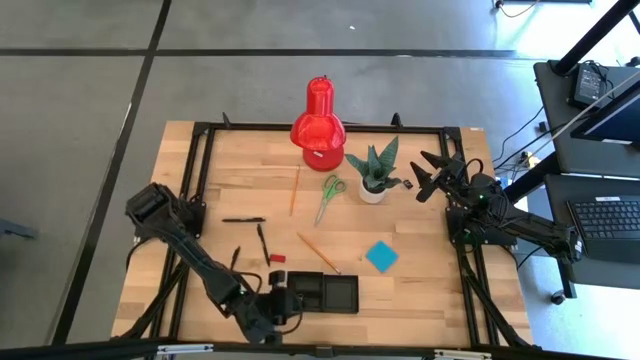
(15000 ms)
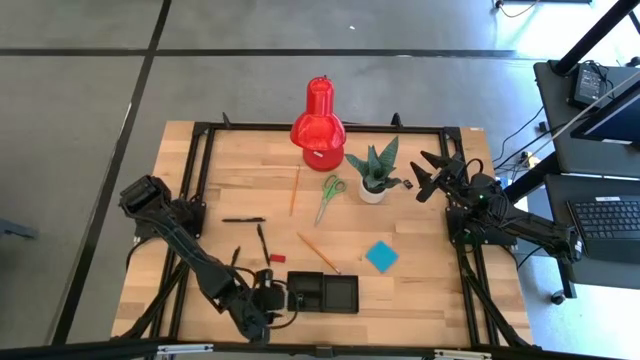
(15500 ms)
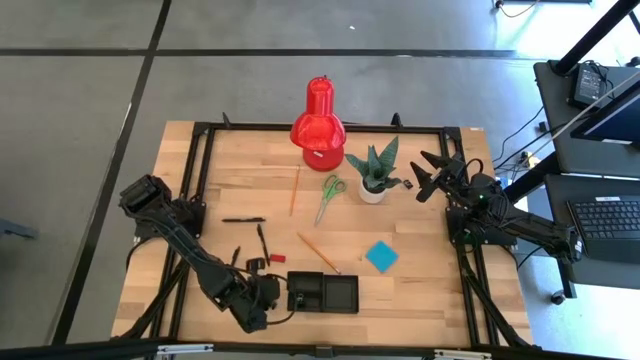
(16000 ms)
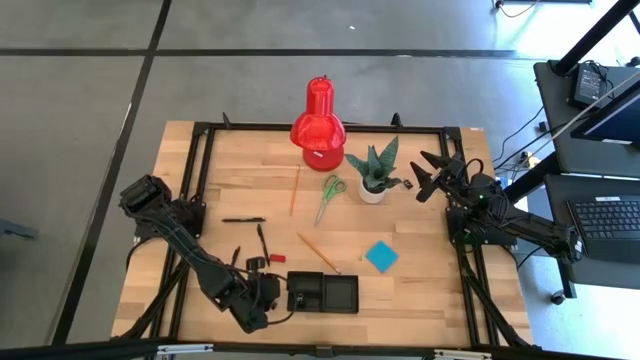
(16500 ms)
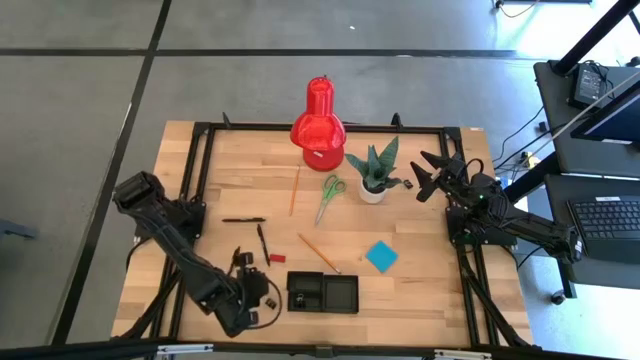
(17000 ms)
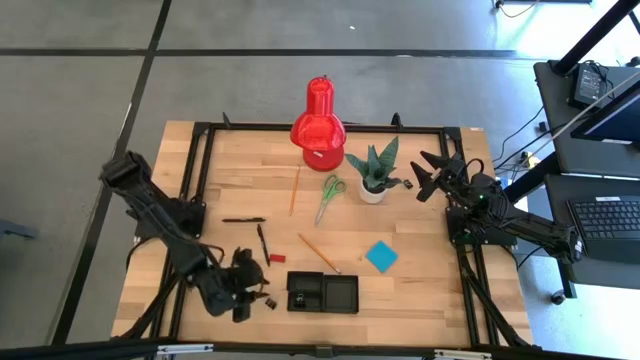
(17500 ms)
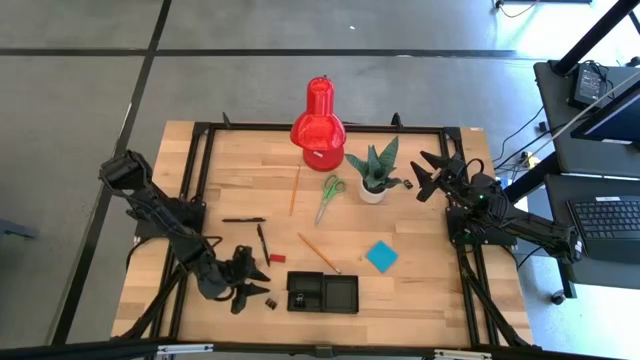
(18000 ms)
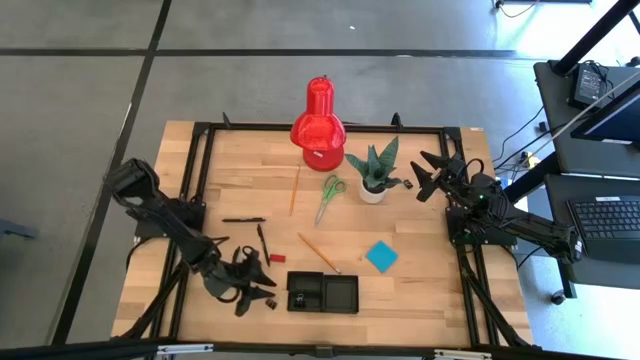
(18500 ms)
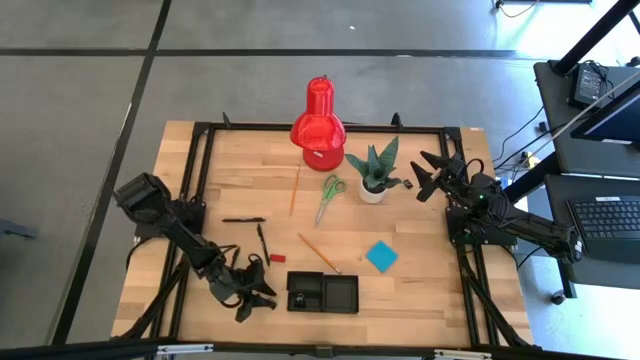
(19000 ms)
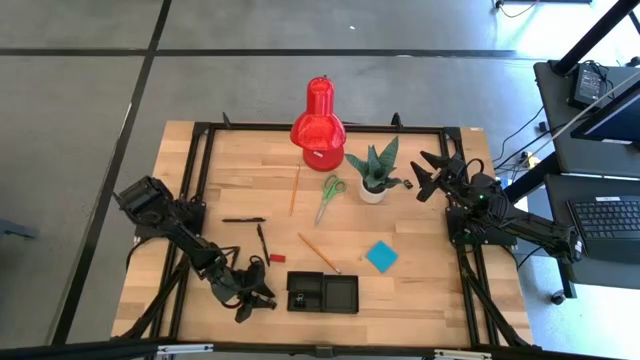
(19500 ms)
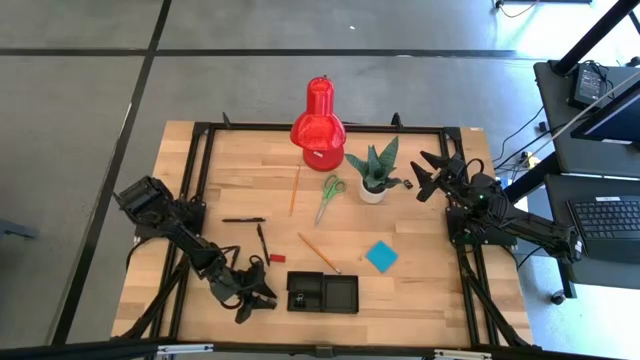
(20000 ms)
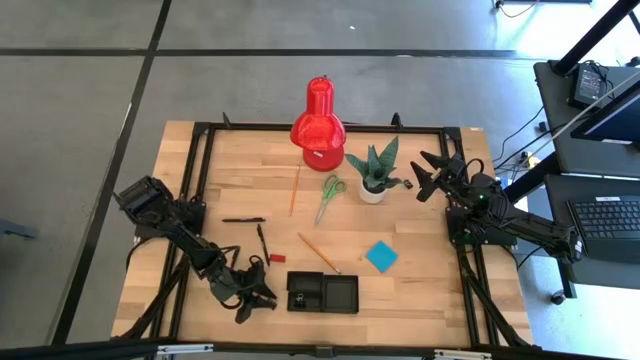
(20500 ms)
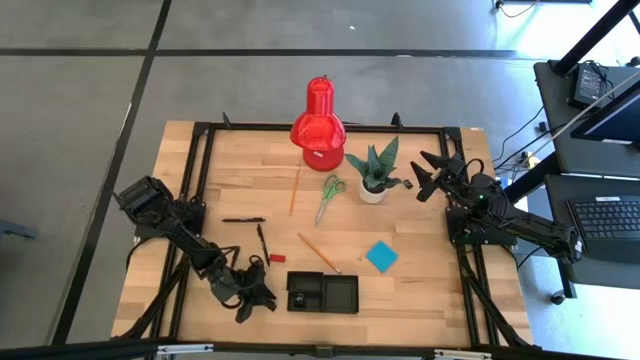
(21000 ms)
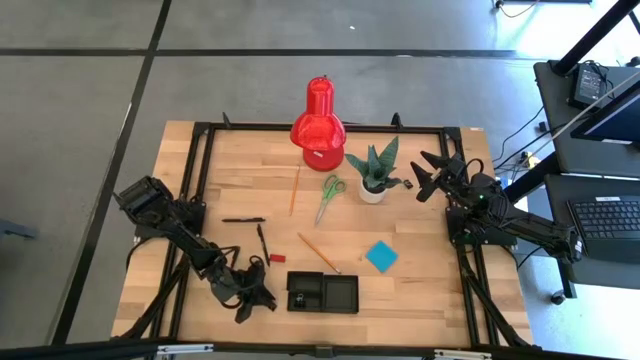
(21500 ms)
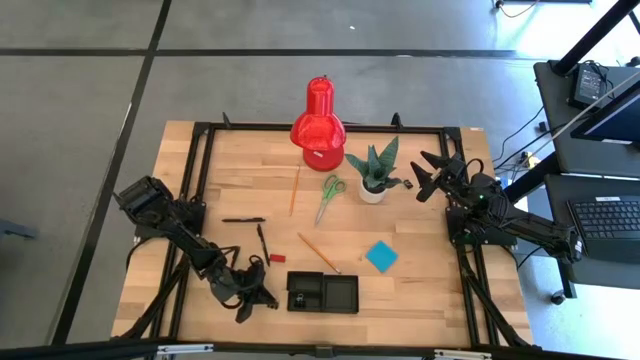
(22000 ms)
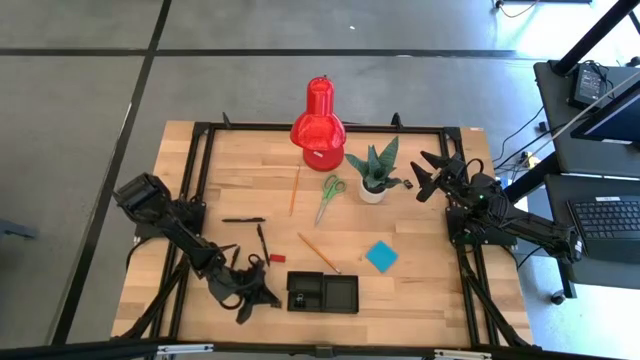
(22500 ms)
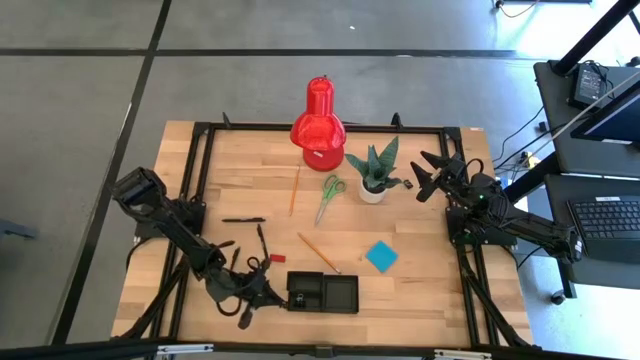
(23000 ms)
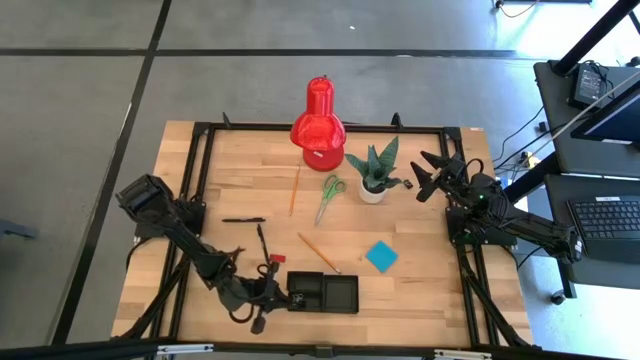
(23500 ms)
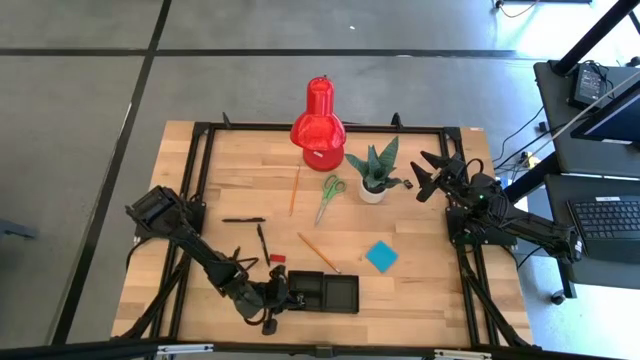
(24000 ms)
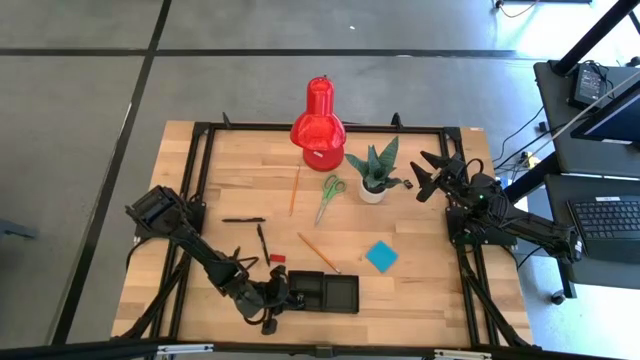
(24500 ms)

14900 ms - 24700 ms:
Task: Pick and place office supplies into organizer
Put the bottom black binder clip into the desk organizer

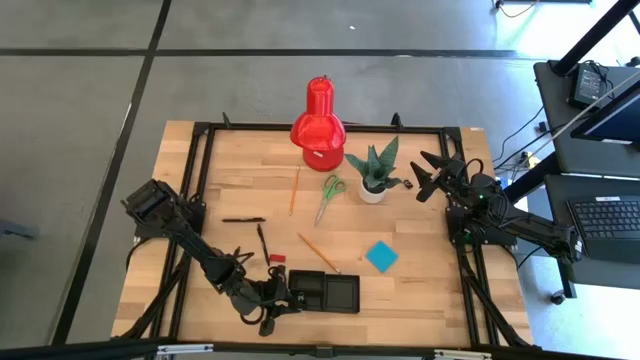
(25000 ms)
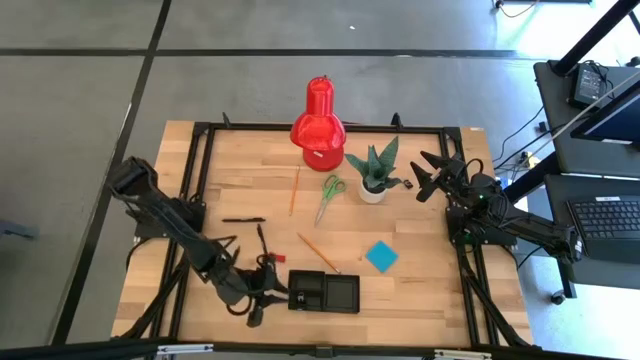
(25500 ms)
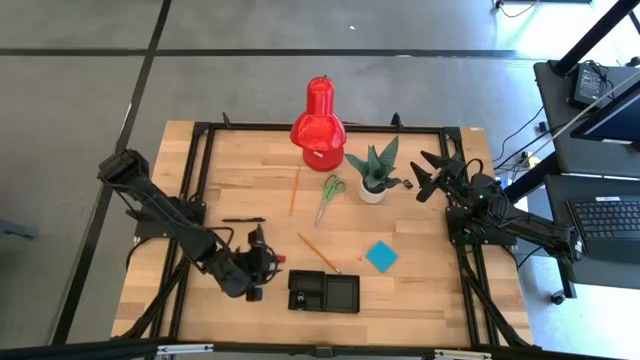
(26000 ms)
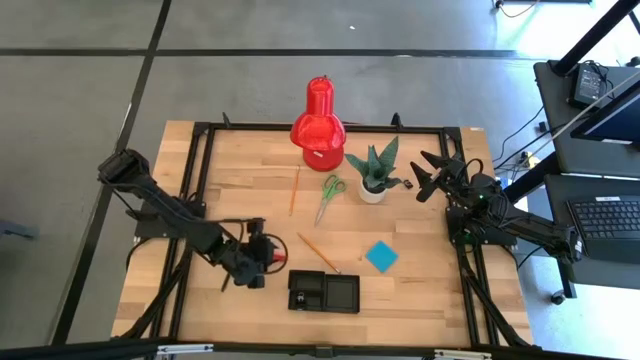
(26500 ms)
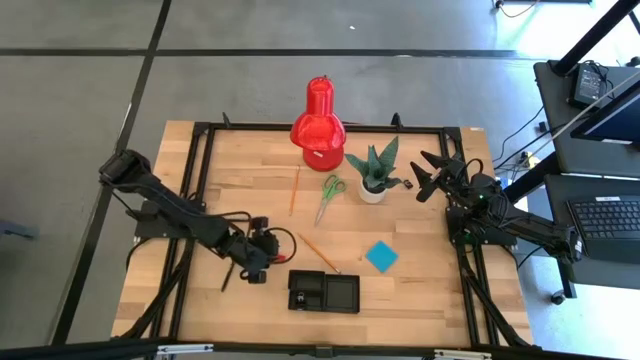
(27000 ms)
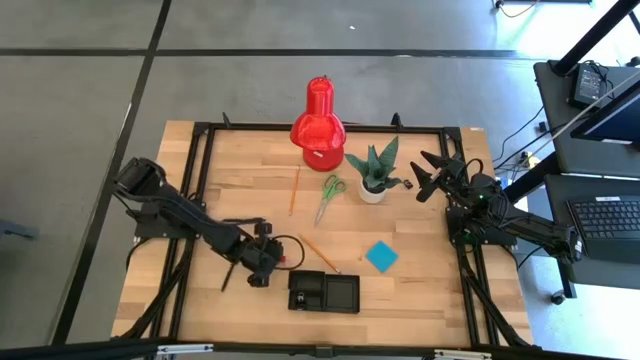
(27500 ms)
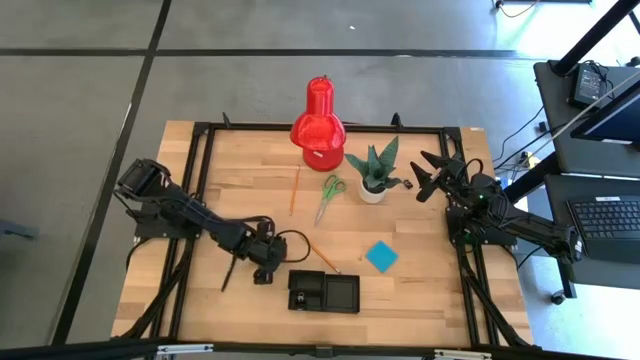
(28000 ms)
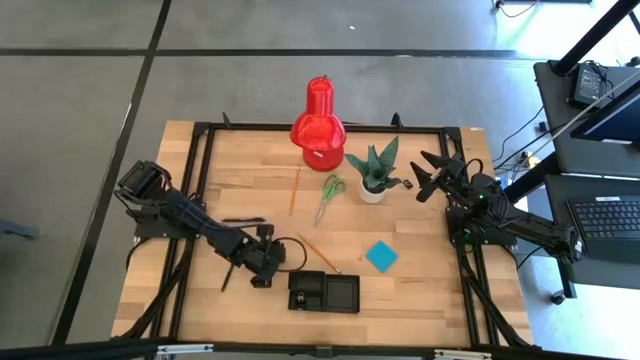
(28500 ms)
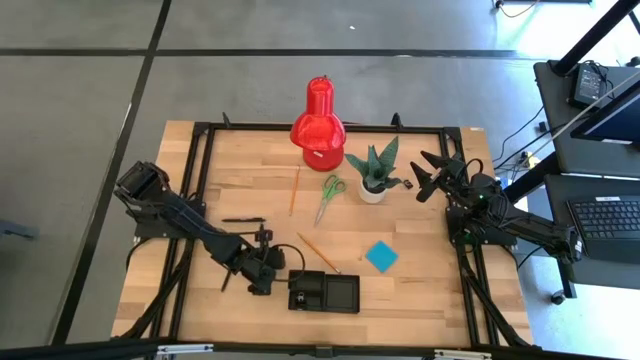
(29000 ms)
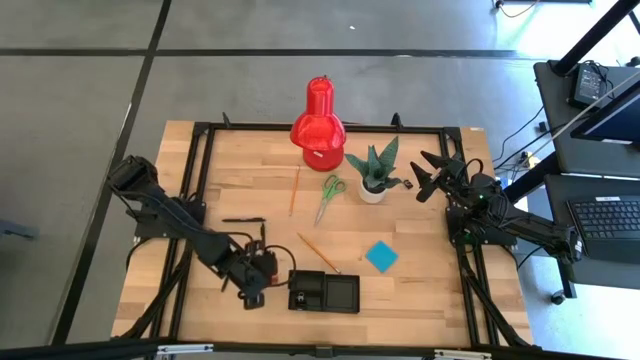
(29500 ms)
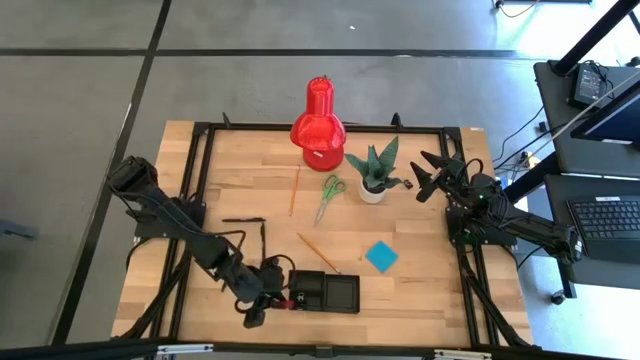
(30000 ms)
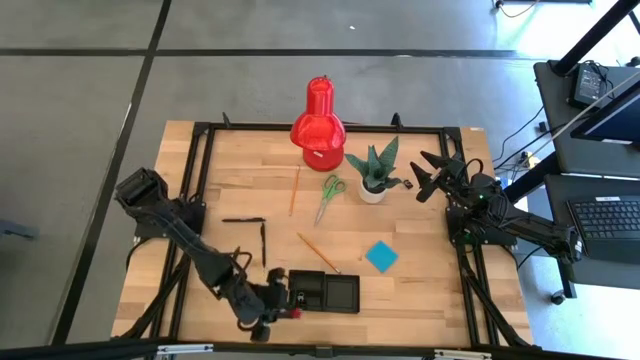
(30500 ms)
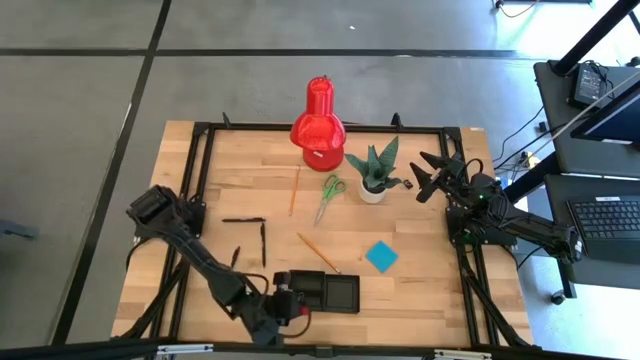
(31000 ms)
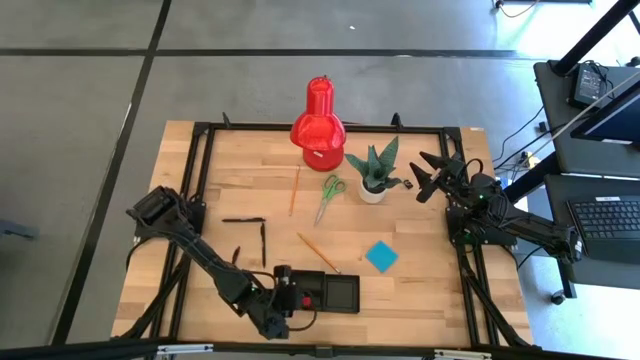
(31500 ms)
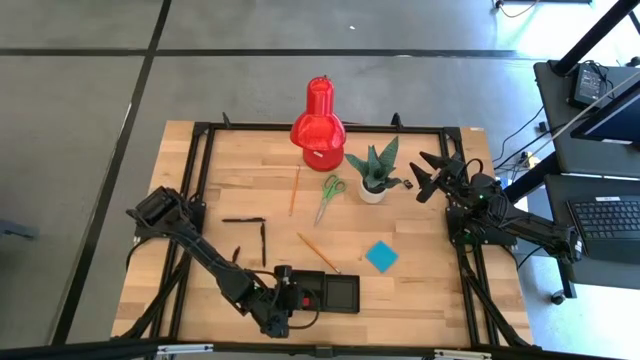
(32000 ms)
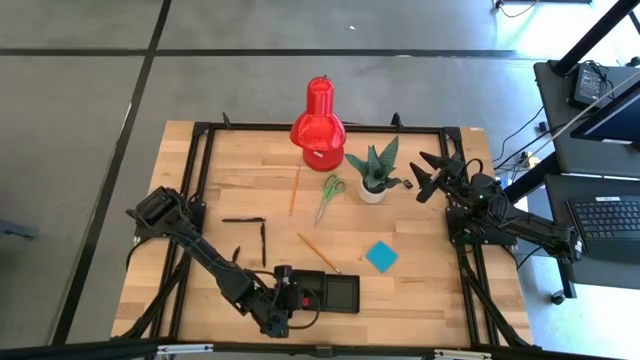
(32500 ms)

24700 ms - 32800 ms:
Put the red eraser into the desk organizer

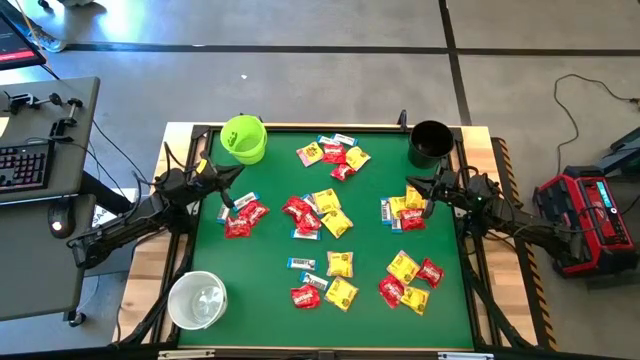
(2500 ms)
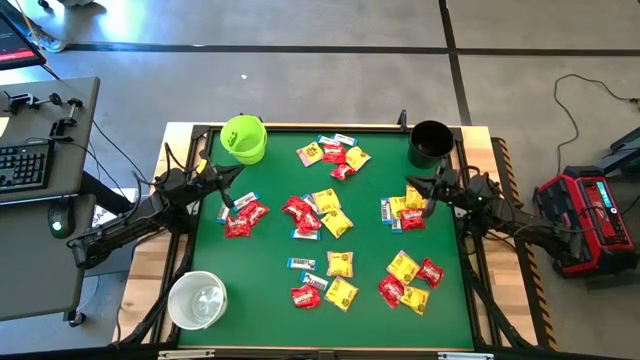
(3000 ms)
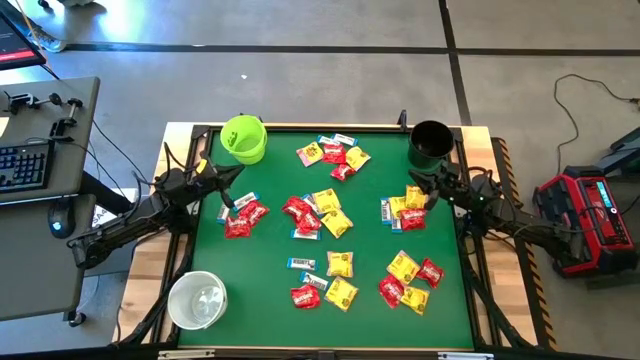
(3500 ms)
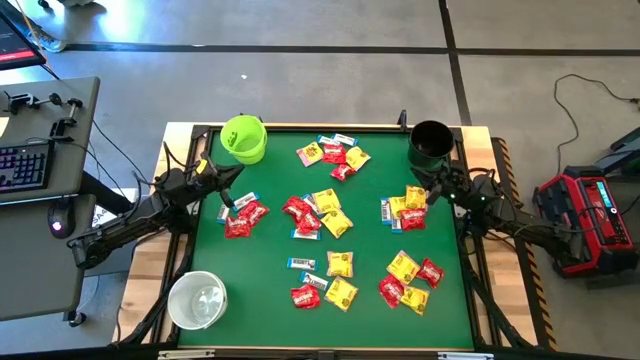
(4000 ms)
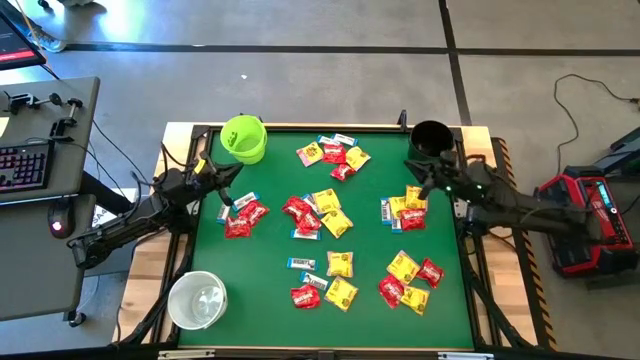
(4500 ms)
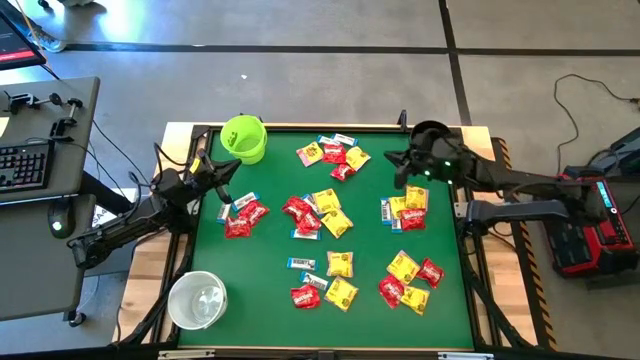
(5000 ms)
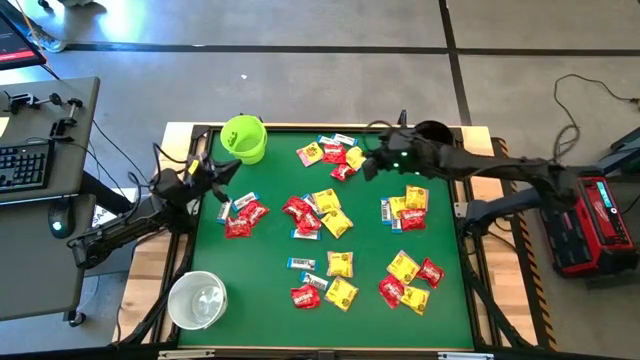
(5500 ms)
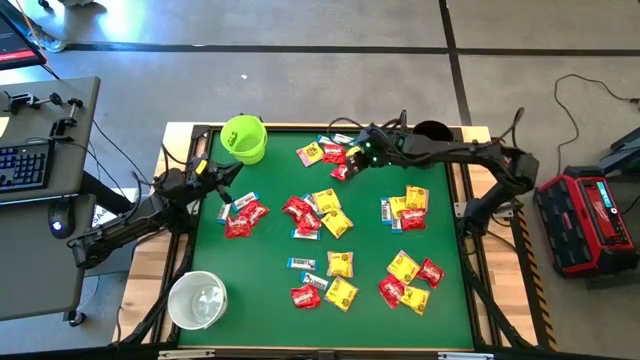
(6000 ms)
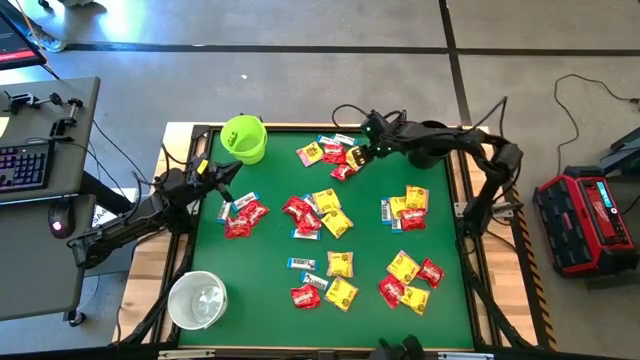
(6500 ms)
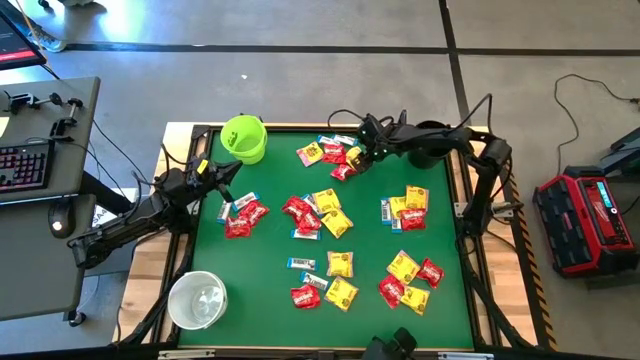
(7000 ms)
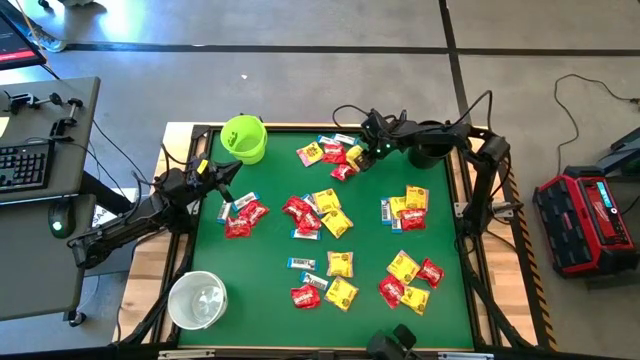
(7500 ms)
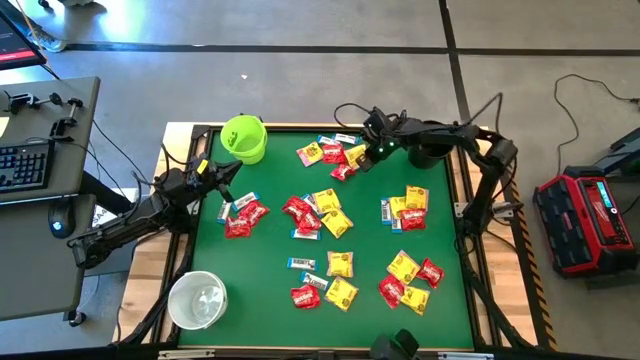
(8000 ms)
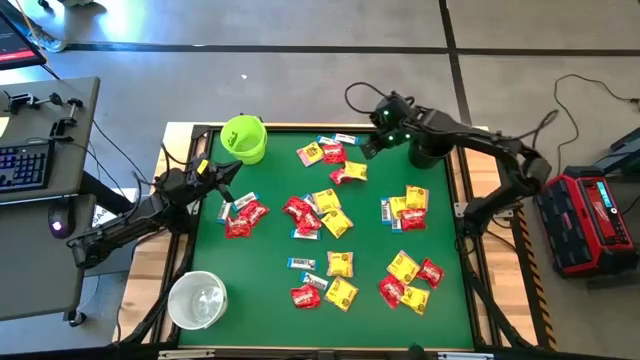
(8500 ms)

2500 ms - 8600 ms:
Task: Sort candy by brand, put in halloween buckets
Put the yellow candy into the black bucket
